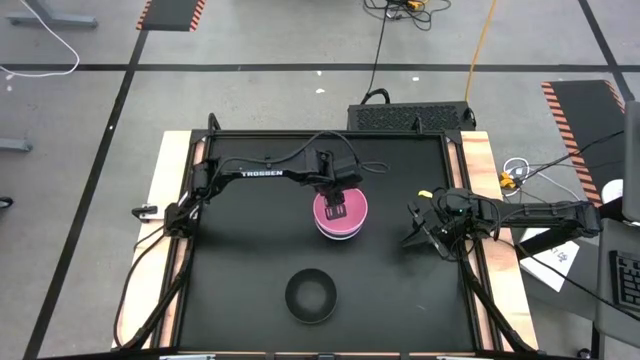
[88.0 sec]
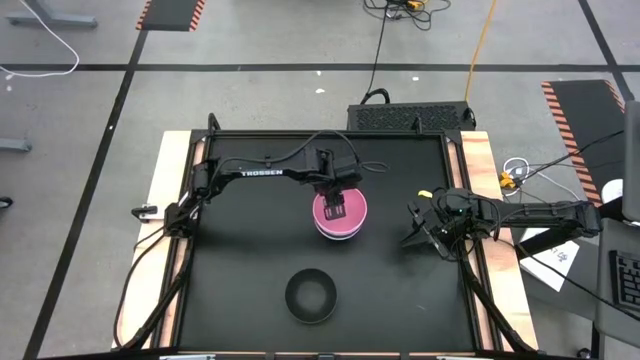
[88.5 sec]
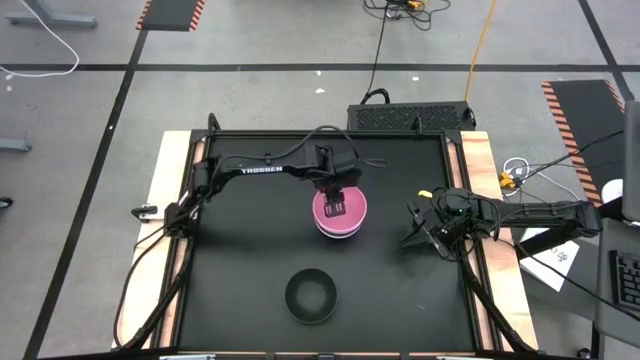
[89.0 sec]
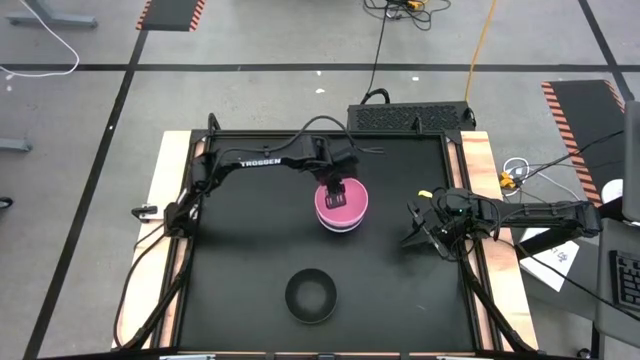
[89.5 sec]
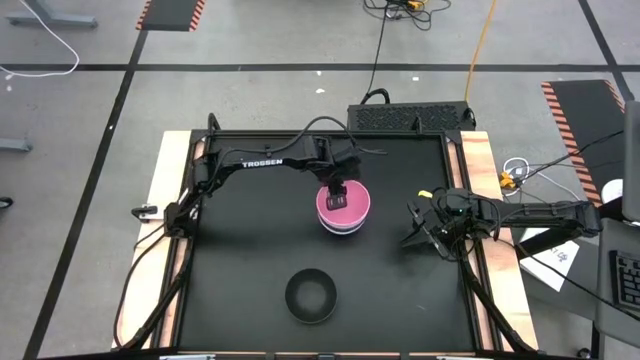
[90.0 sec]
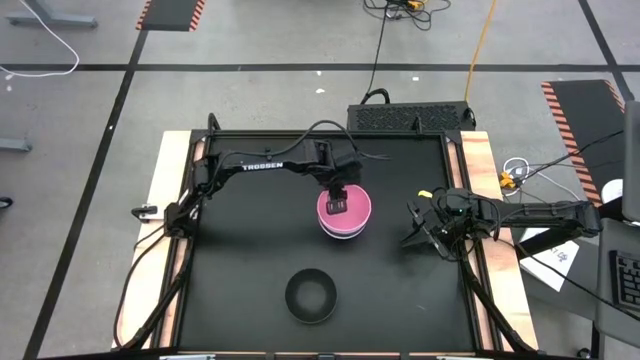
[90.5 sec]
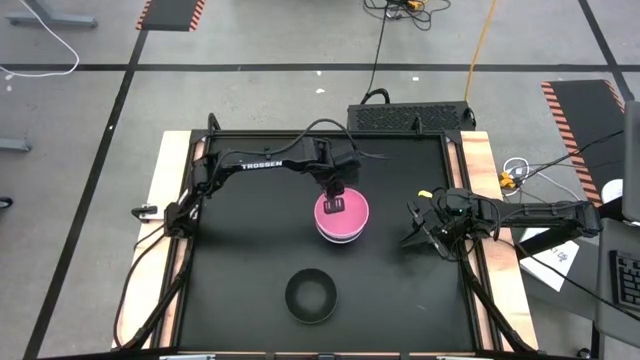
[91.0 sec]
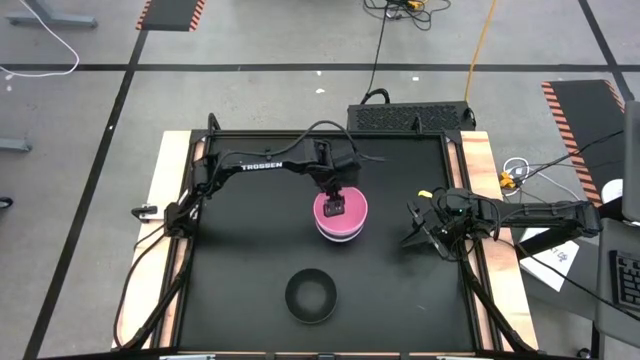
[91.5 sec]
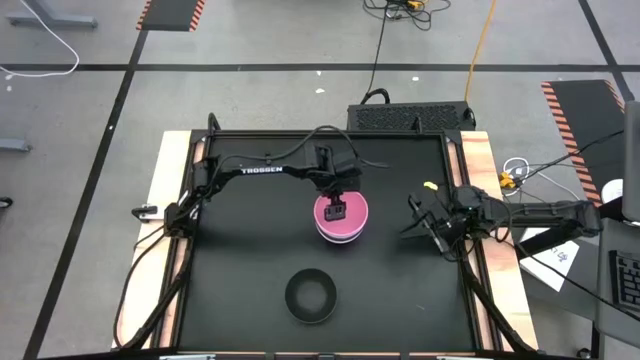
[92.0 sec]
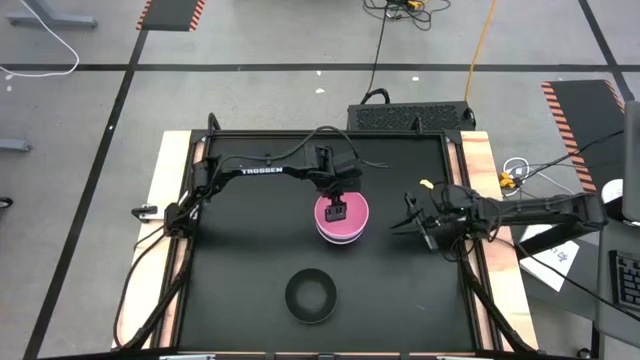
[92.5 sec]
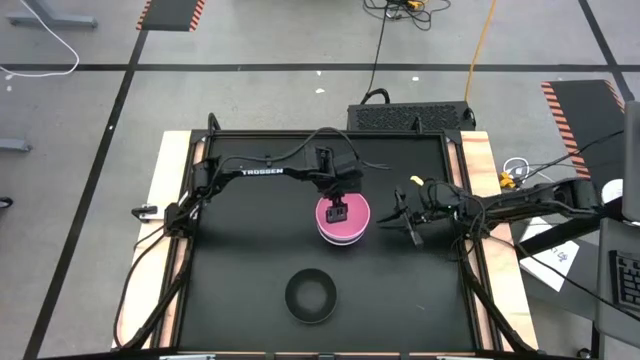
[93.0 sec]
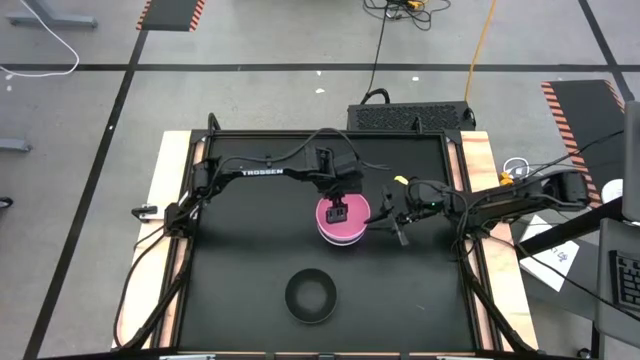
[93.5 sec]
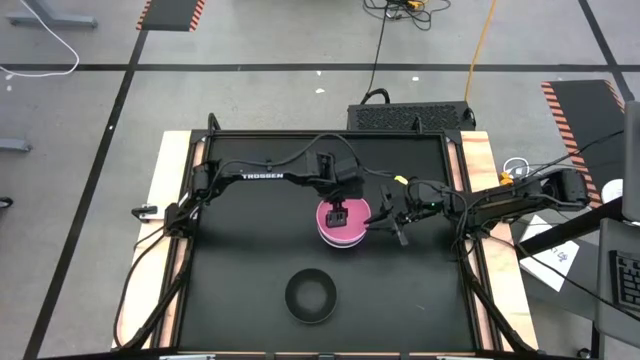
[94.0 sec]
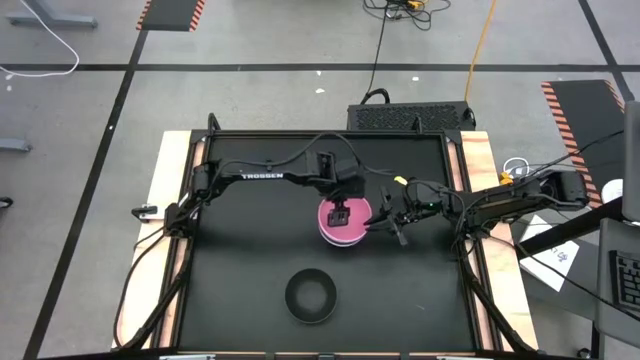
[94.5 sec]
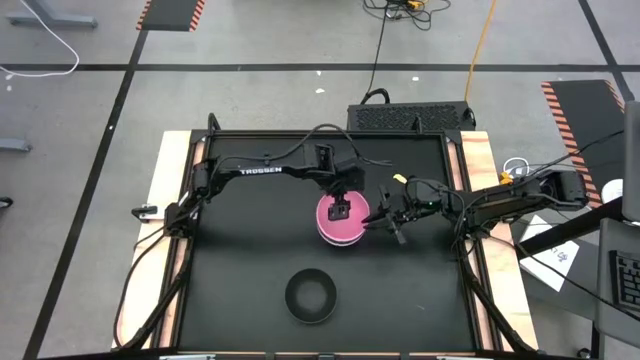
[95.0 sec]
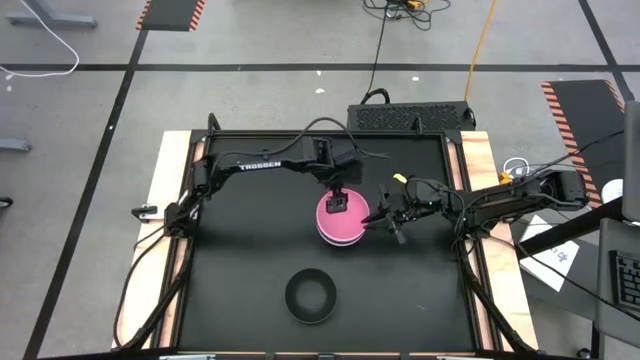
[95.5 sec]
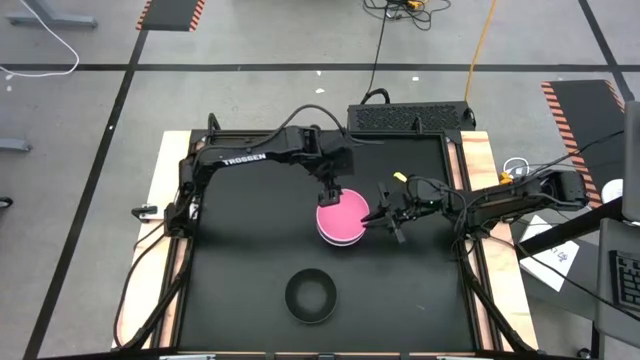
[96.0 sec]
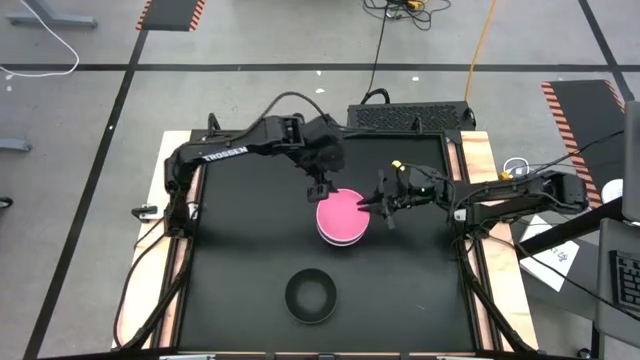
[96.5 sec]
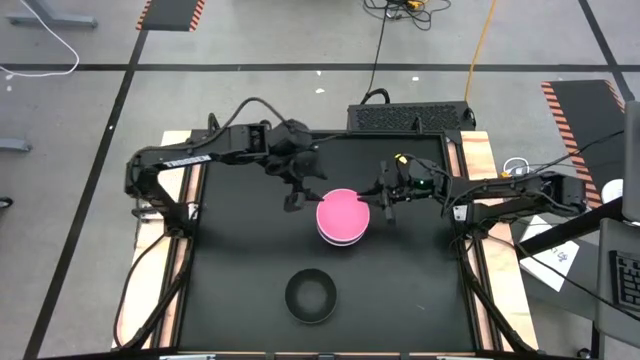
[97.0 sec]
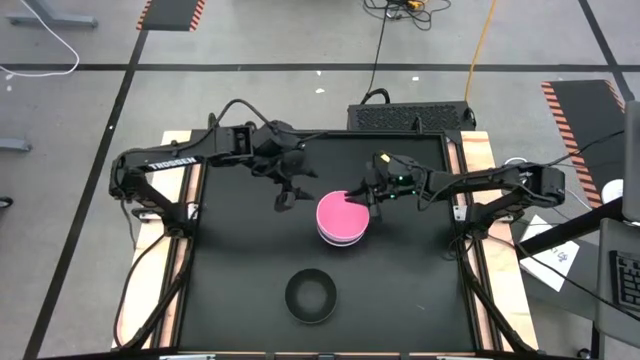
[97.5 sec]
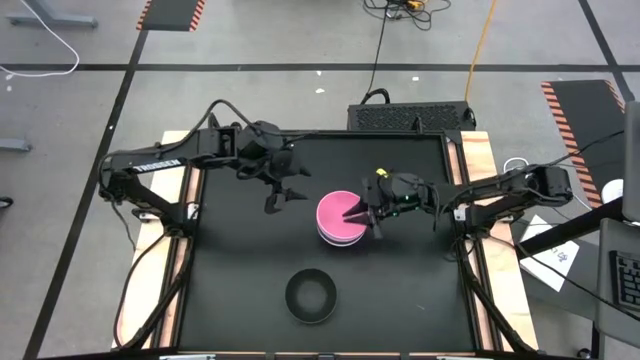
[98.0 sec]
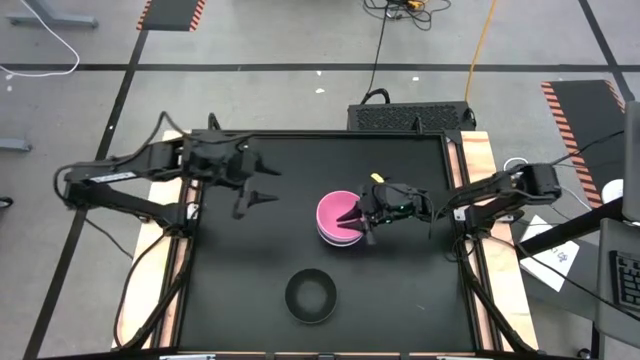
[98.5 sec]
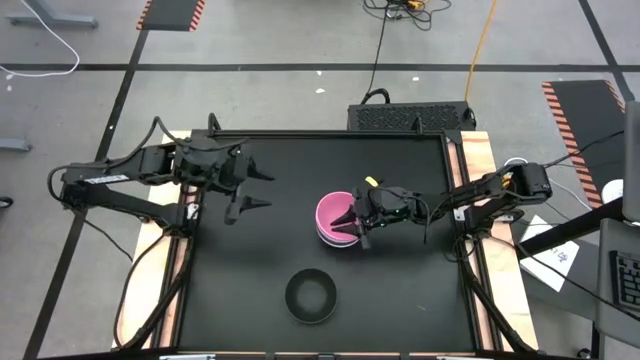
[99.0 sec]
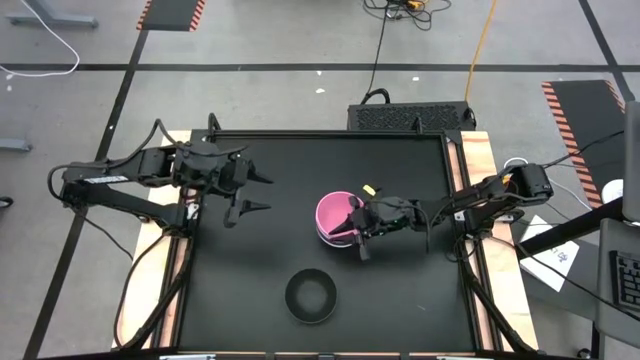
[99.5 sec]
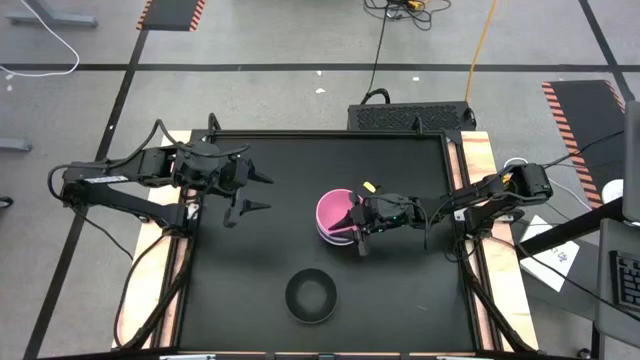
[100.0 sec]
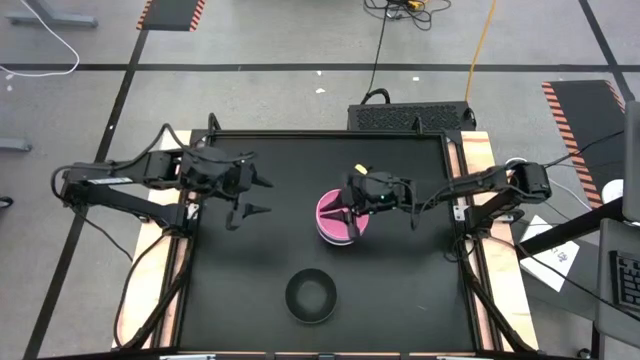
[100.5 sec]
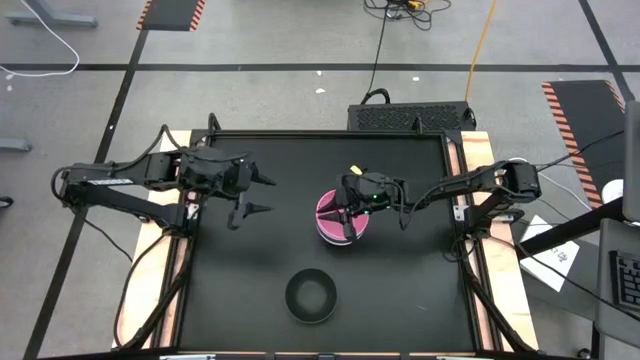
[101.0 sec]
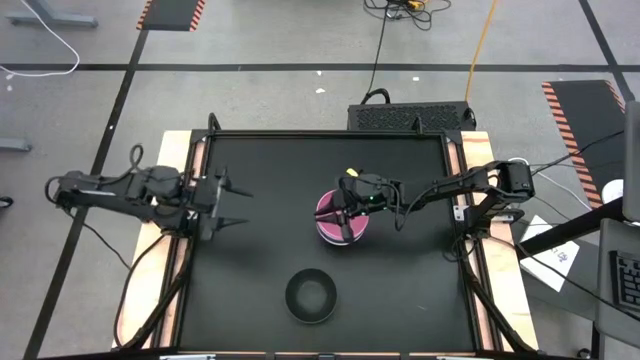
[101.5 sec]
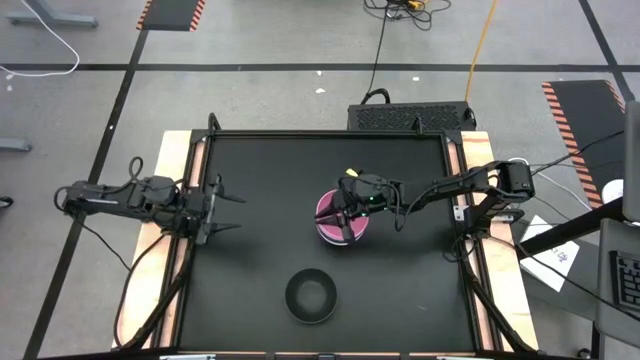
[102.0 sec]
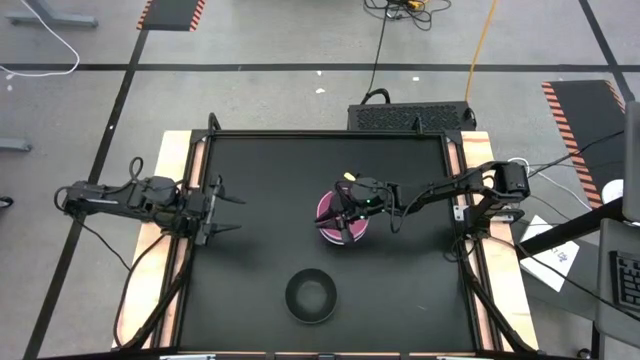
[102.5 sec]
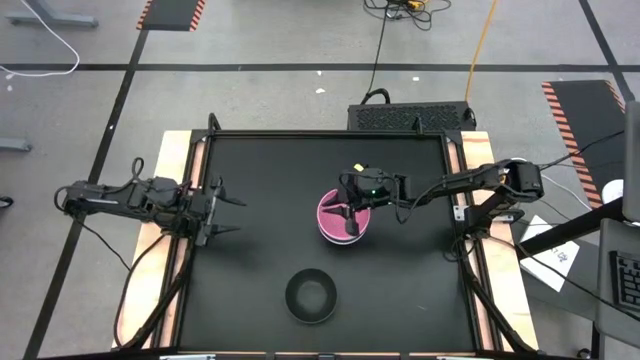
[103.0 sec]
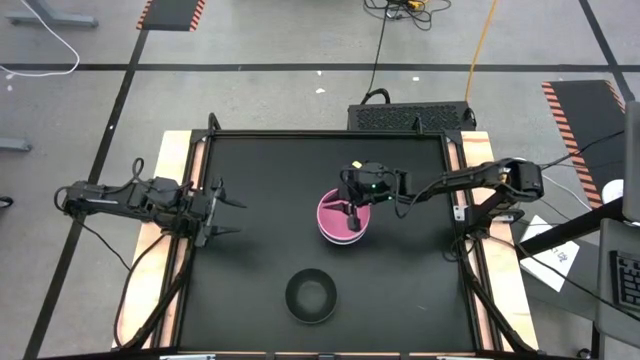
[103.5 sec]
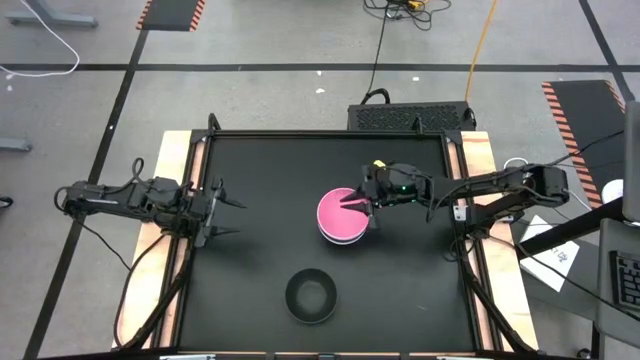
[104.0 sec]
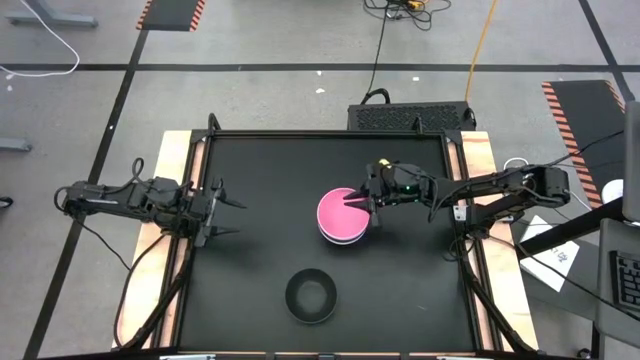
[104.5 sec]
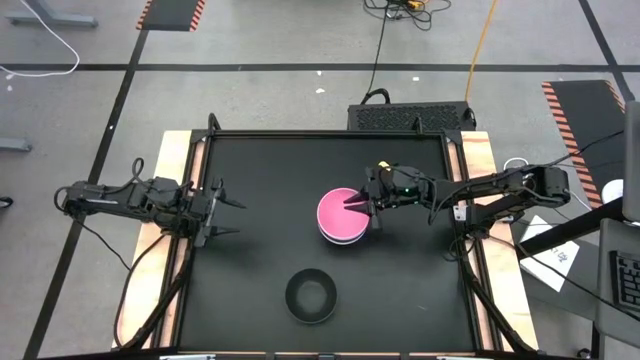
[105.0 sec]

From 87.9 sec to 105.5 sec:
Task: Nest bowls inside each other
Stack the pink bowl on top of the purple bowl

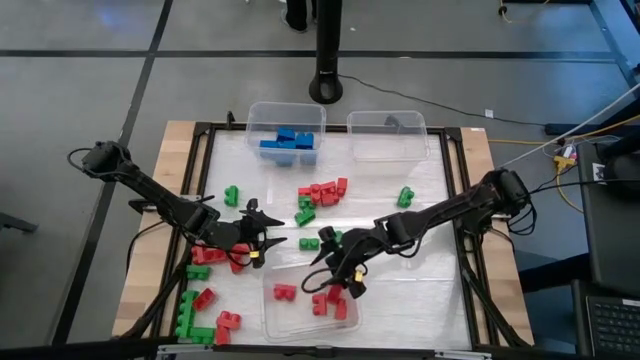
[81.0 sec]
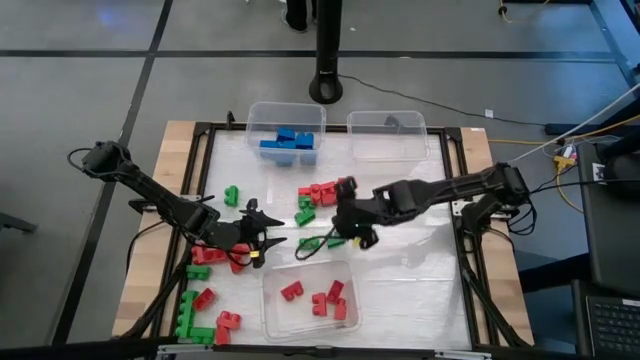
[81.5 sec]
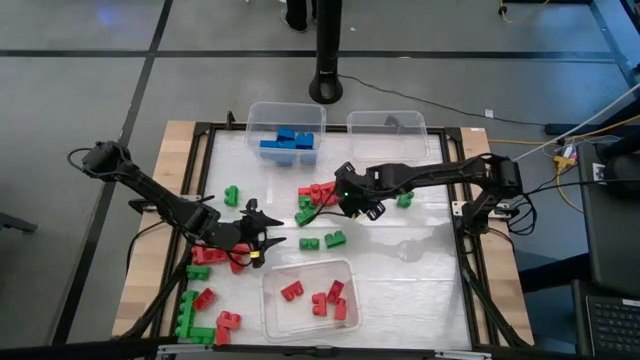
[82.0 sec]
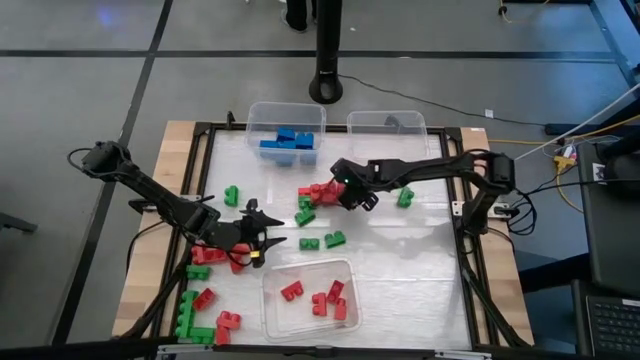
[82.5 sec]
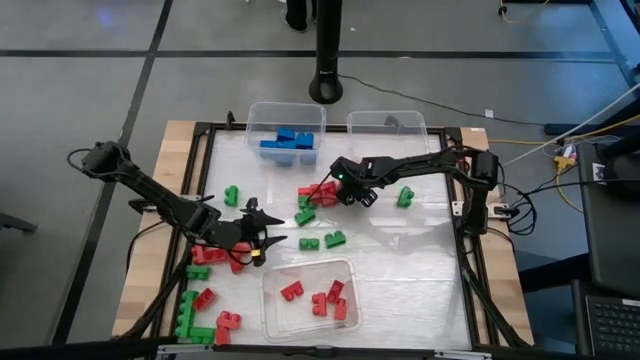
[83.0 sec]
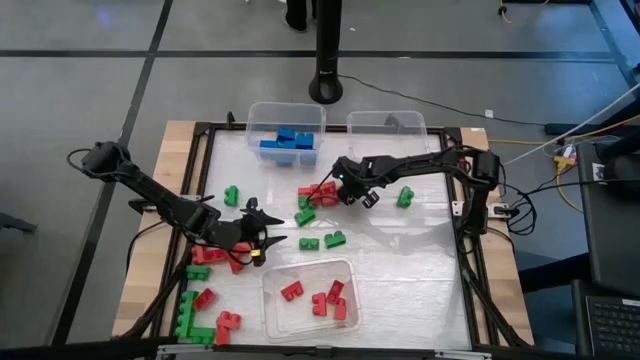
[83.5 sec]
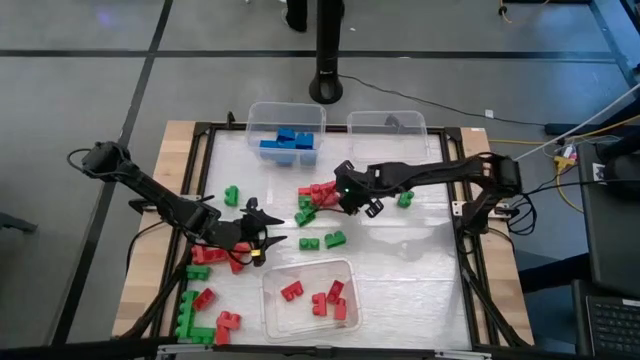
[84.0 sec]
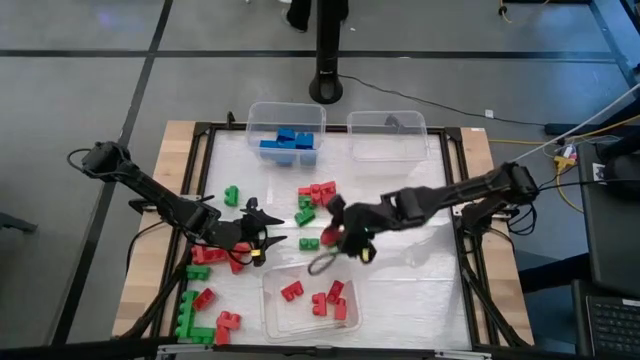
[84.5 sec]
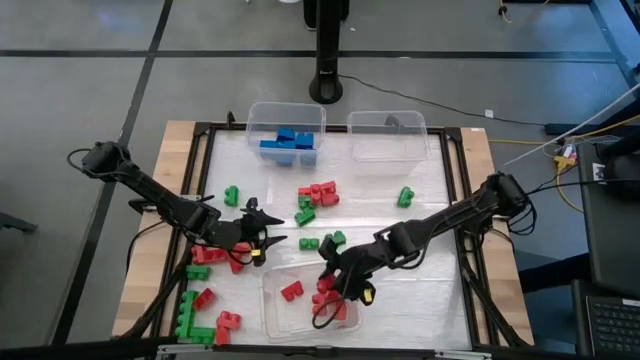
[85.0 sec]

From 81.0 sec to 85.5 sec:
Task: Sort blocks
Put the red game piece into the bottom transparent bin
